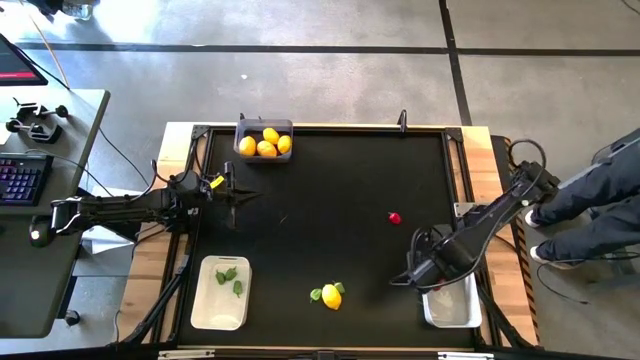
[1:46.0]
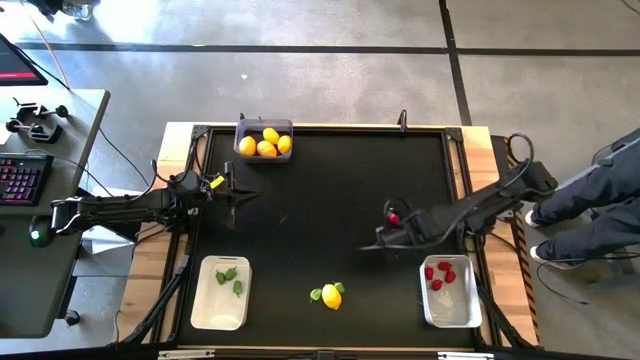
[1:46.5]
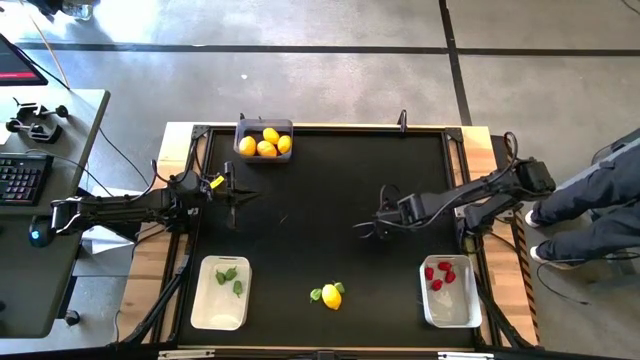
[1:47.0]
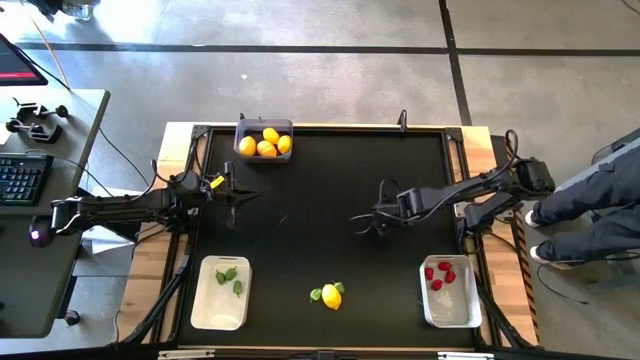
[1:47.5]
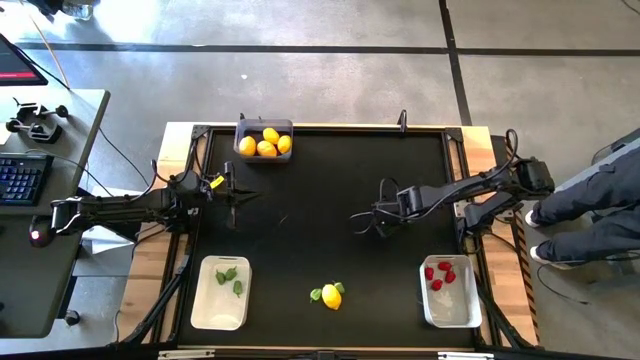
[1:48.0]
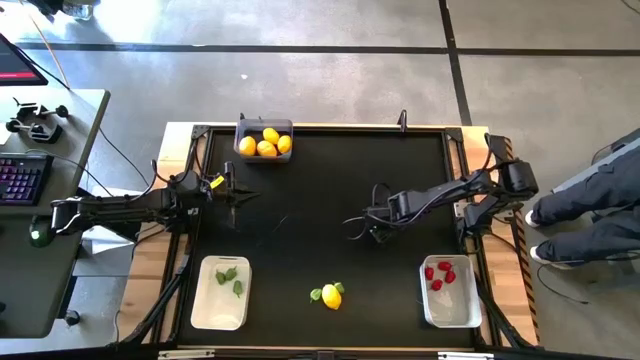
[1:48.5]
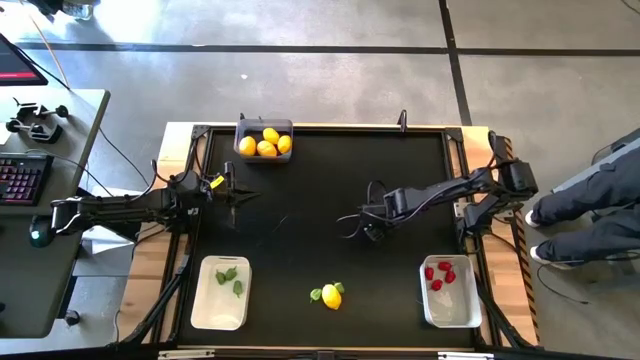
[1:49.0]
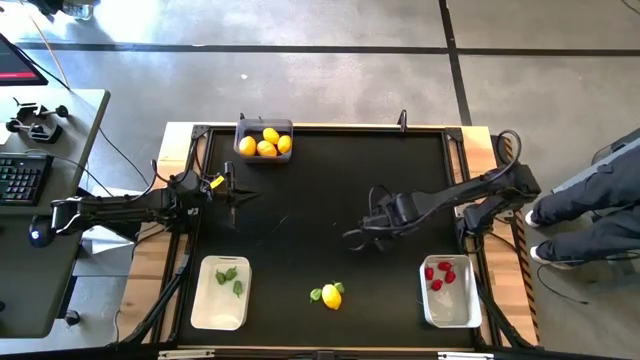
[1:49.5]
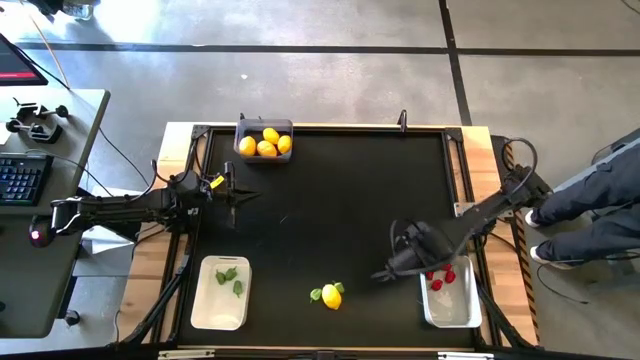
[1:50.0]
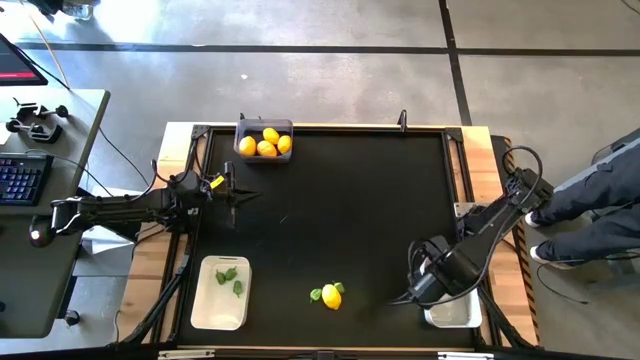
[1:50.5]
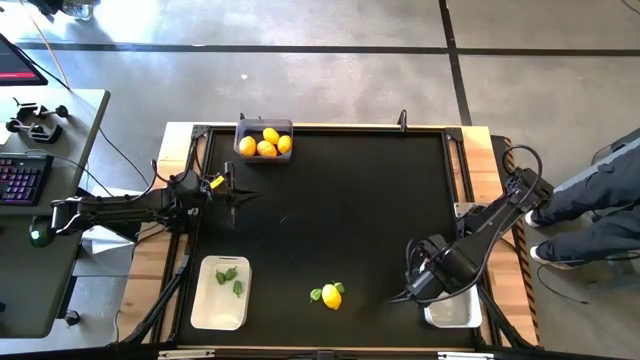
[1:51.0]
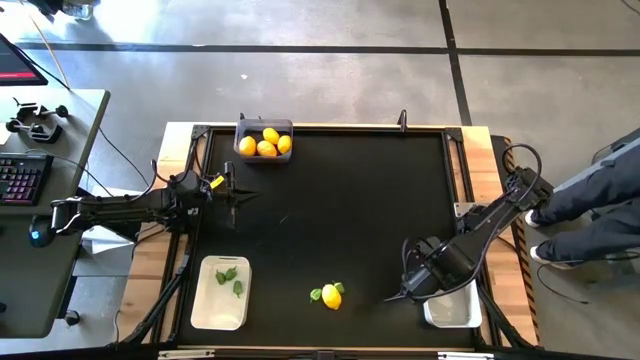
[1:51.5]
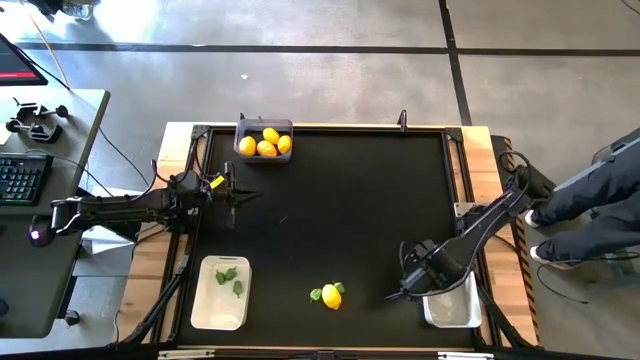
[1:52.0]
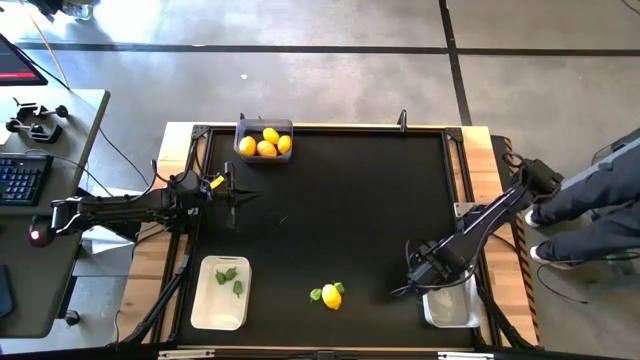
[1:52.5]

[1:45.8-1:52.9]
Task: Sort produce into baskets
Put the red chili pepper into the gray bin

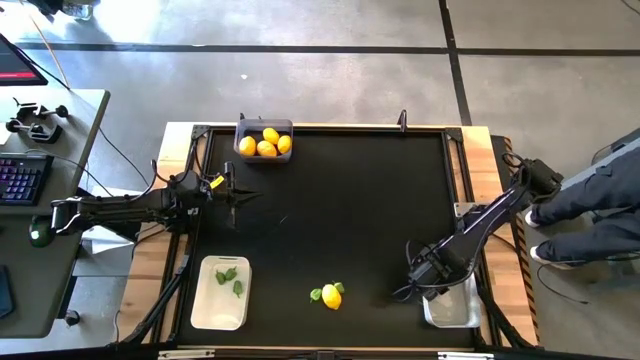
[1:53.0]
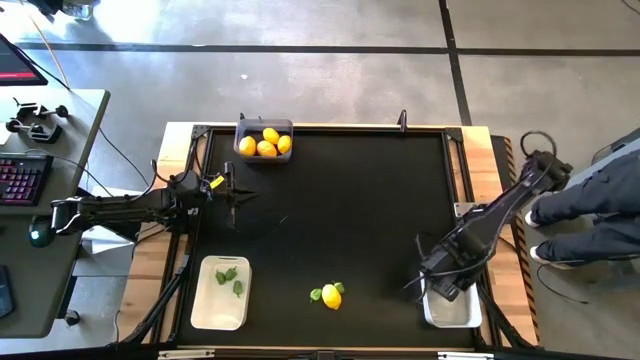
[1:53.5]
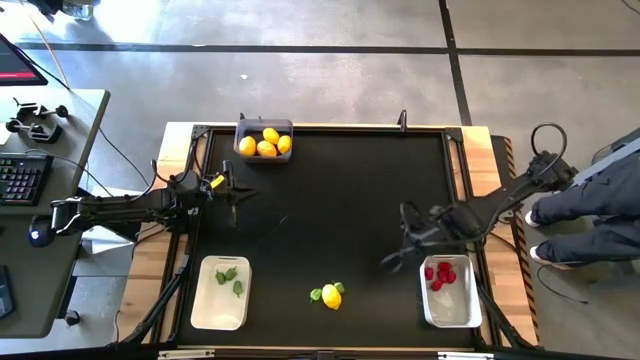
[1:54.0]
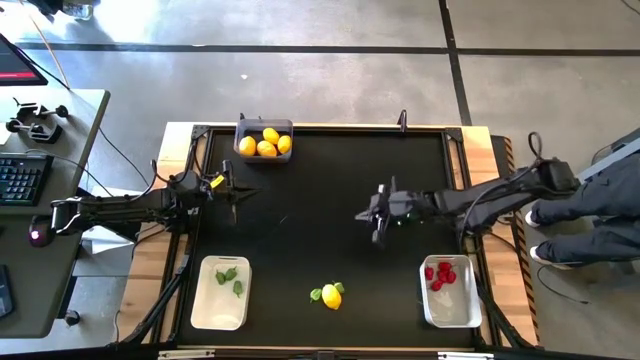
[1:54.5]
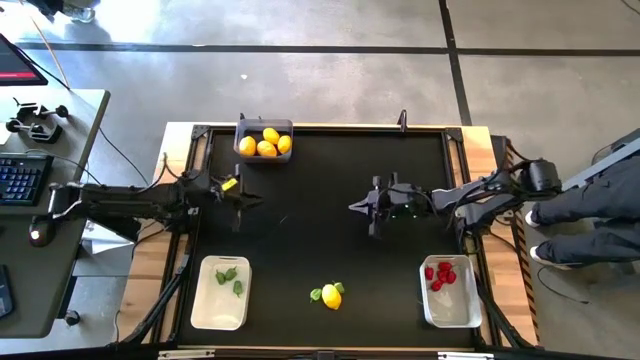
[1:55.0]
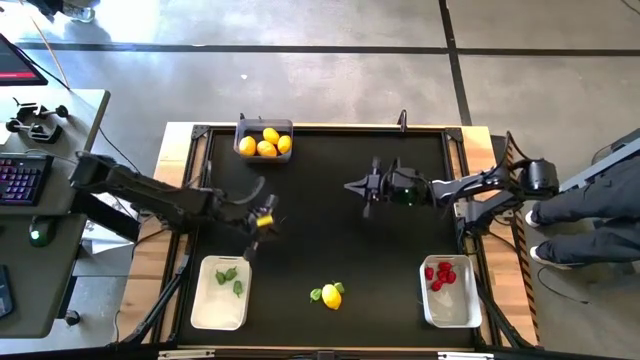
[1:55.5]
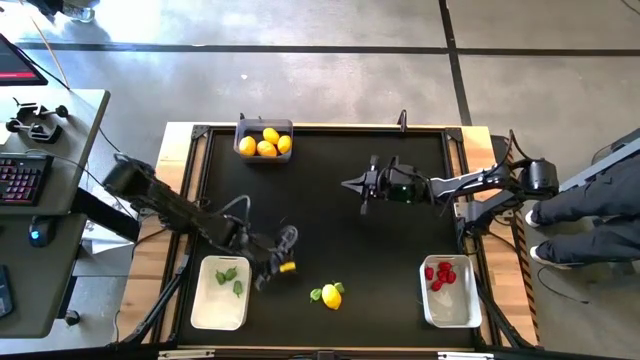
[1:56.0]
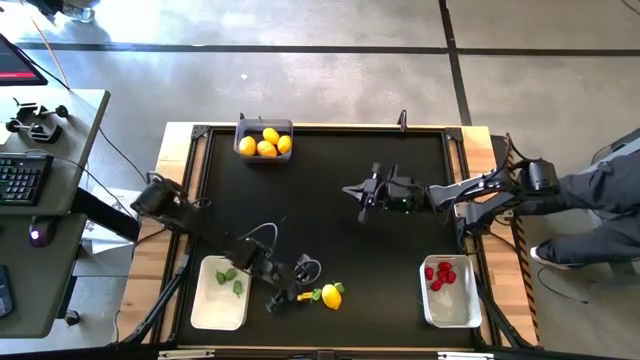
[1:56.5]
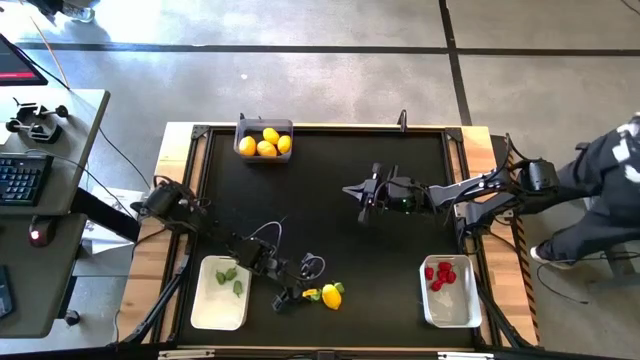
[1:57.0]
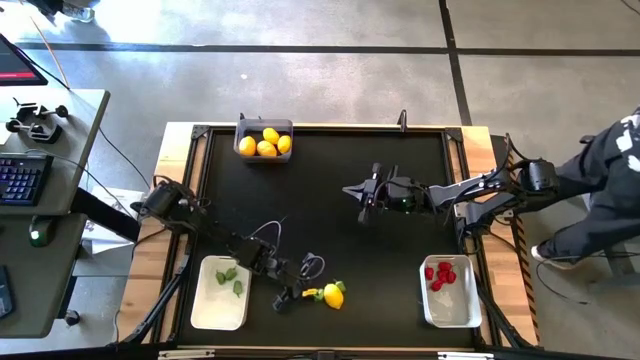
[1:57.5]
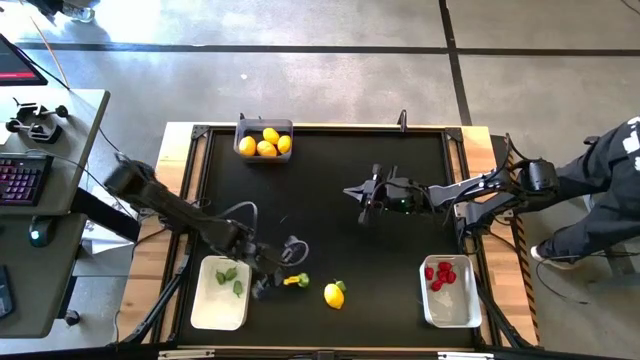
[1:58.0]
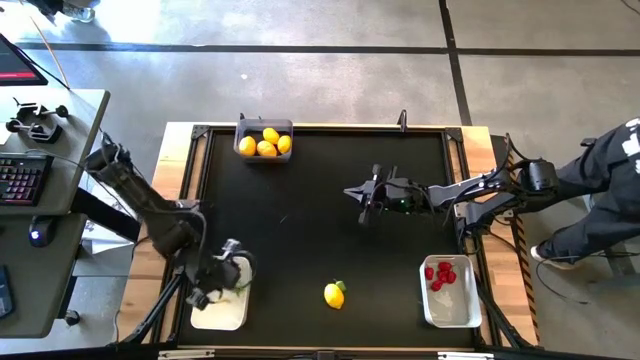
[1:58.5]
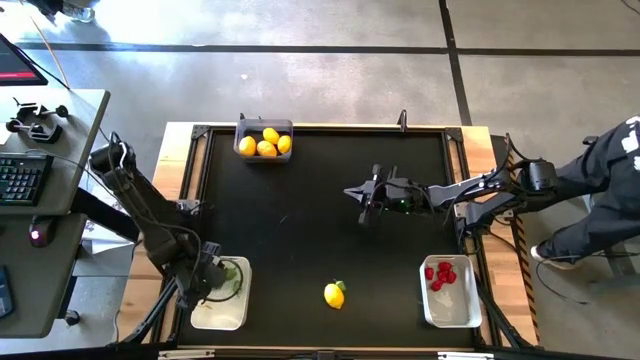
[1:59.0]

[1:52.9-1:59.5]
Put the green chili pepper into the white bin

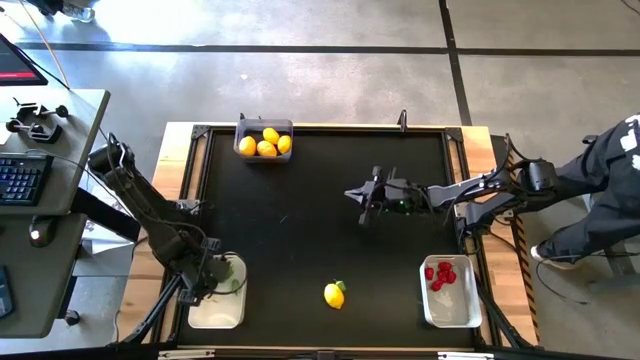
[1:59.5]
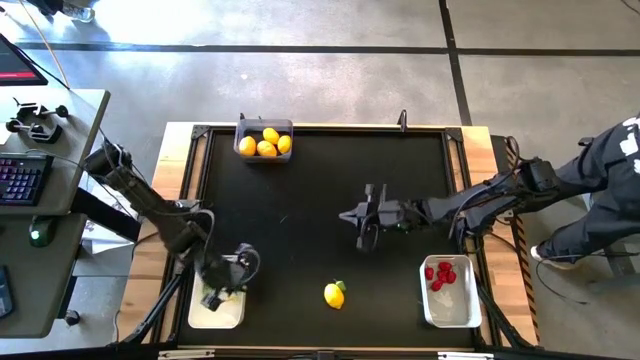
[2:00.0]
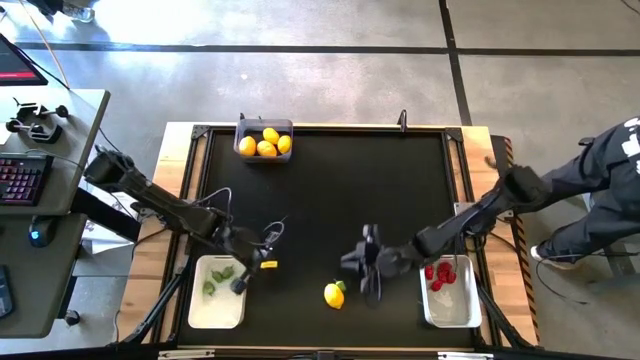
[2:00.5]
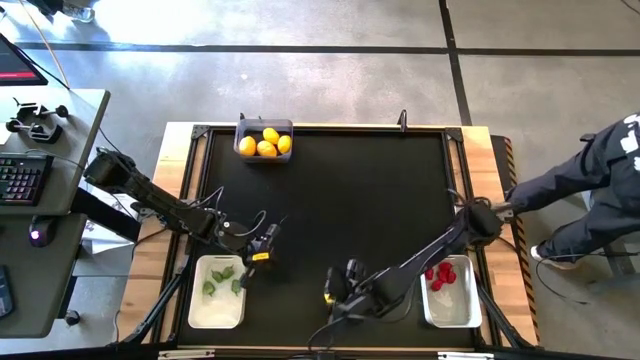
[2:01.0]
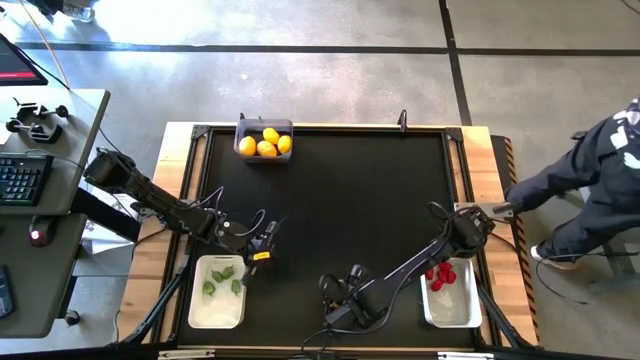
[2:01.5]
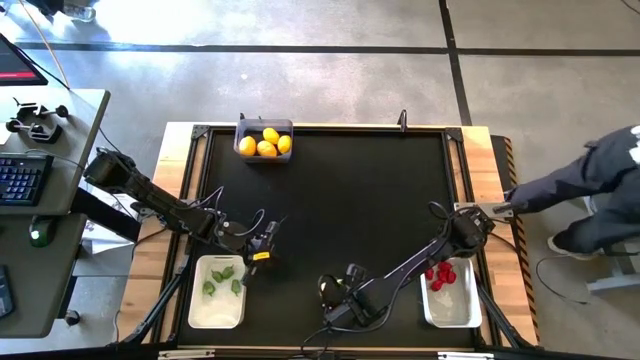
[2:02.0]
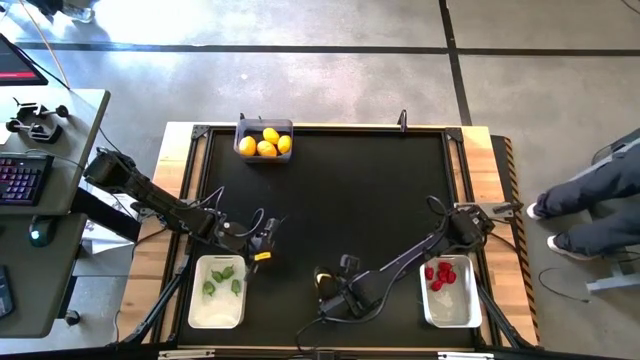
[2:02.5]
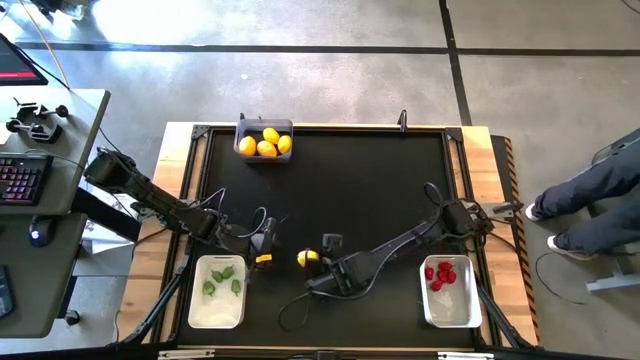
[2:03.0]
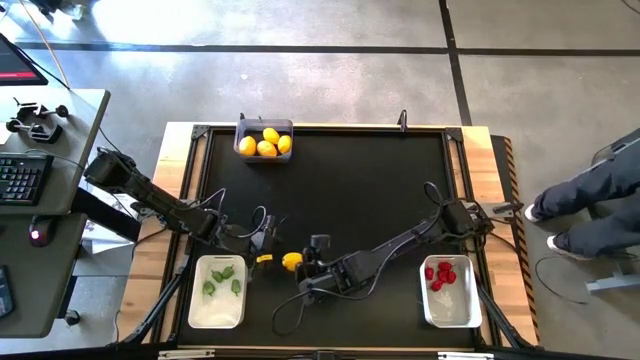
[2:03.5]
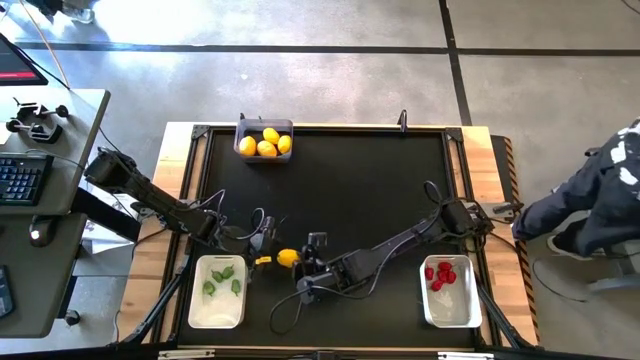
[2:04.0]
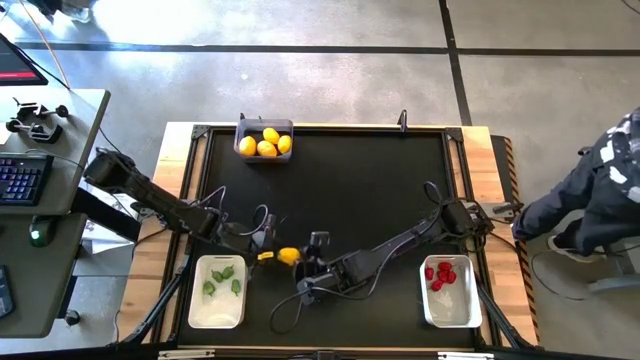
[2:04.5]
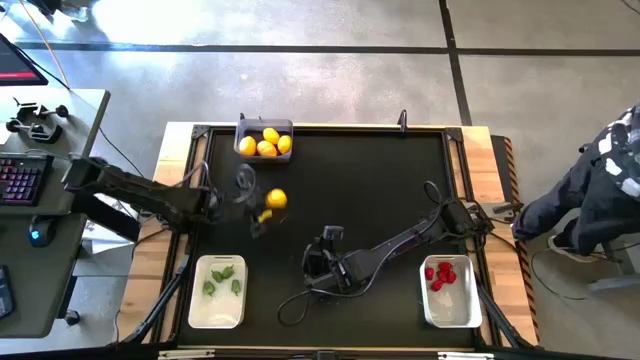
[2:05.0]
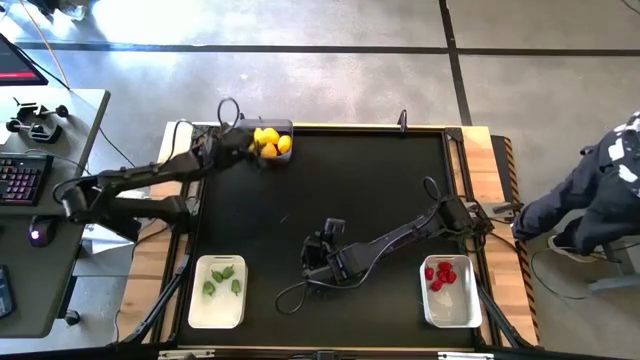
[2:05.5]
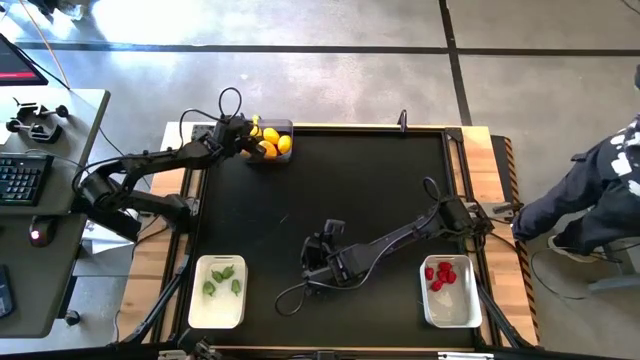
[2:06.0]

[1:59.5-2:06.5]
Put the yellow lemon into the black bin

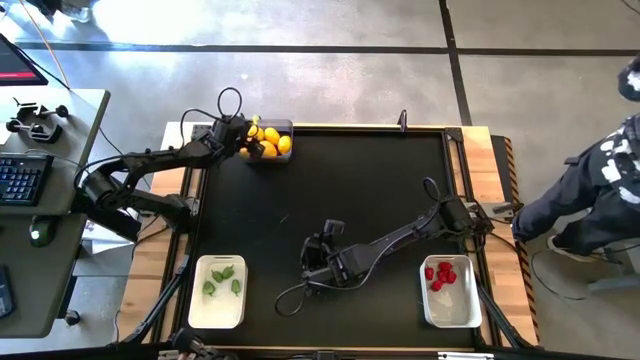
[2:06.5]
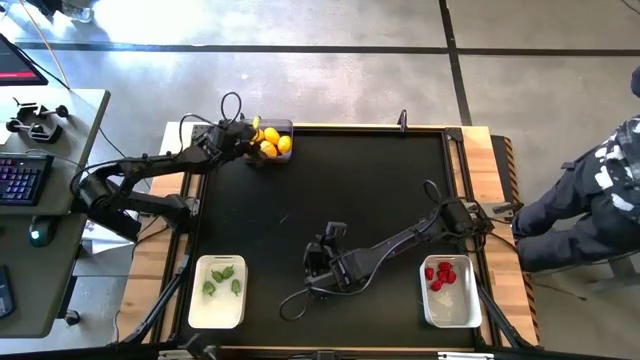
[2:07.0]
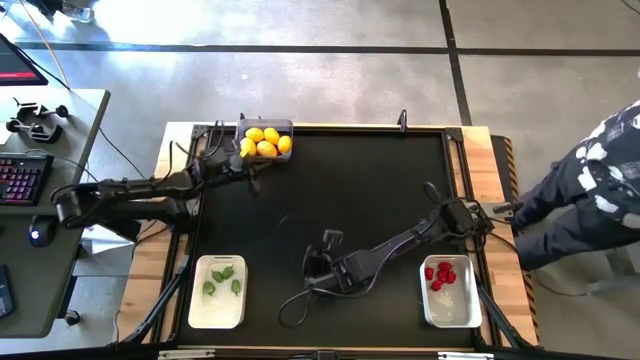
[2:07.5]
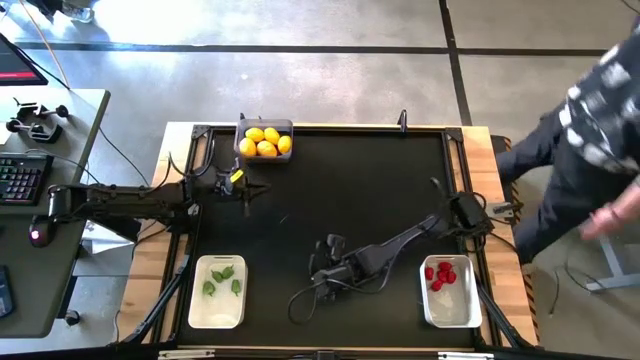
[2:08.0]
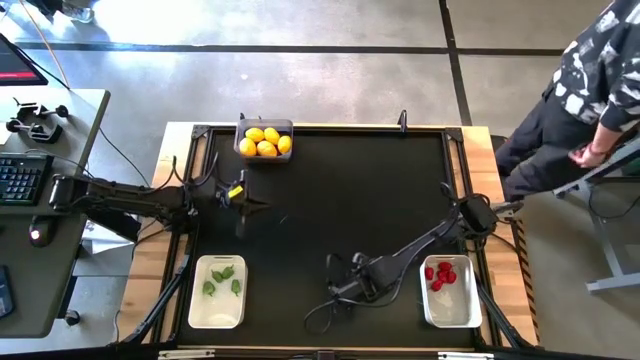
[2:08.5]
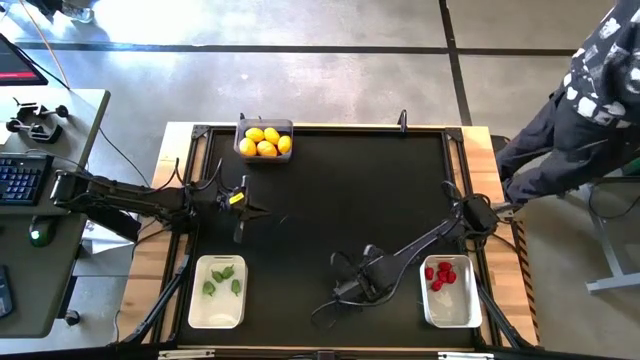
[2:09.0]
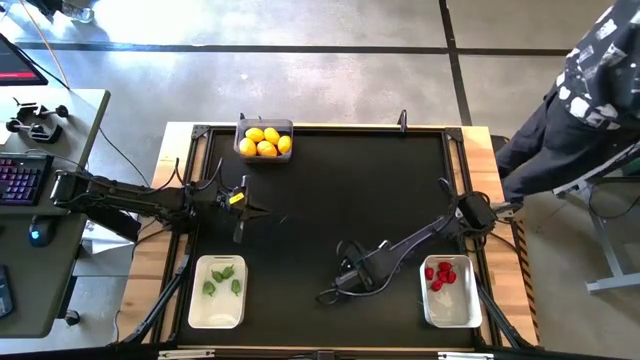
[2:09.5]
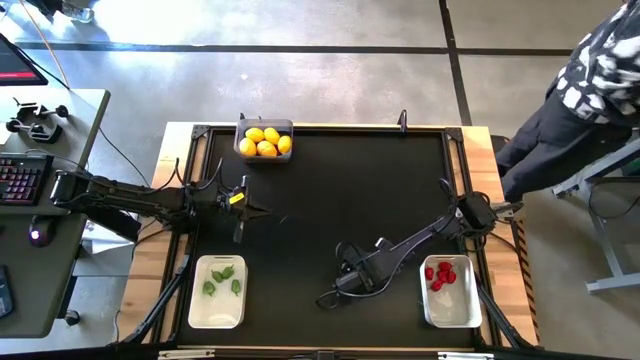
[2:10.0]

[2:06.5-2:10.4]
Put the green chili pepper into the white bin
